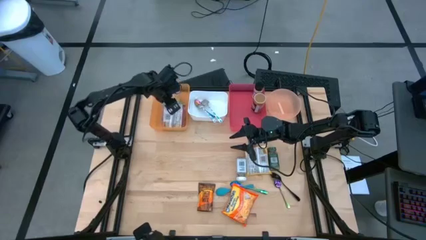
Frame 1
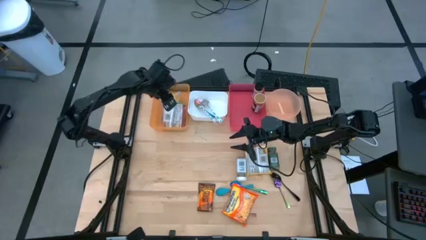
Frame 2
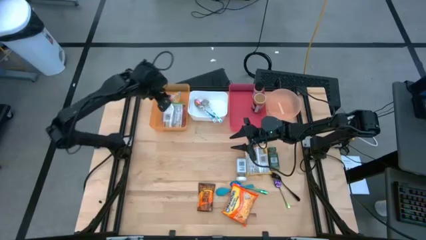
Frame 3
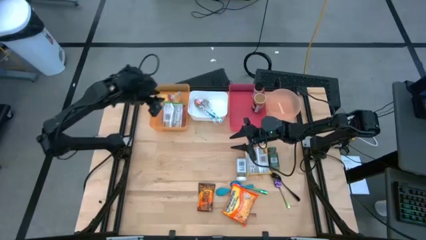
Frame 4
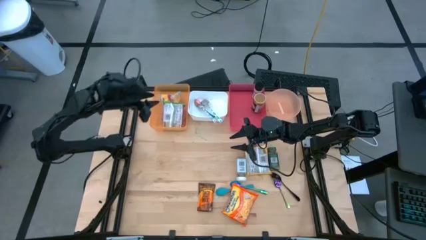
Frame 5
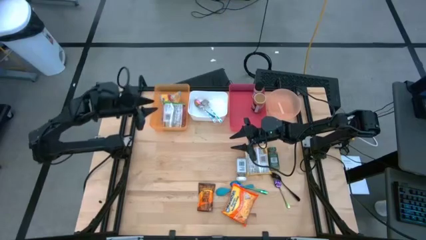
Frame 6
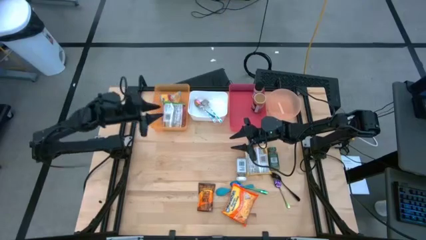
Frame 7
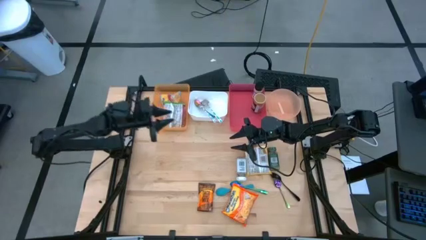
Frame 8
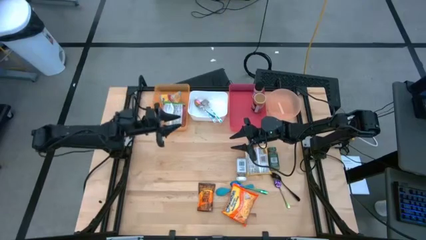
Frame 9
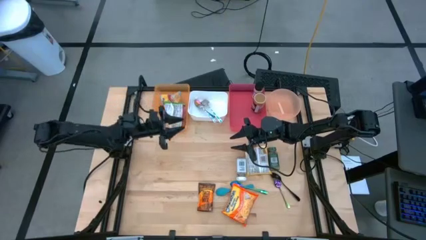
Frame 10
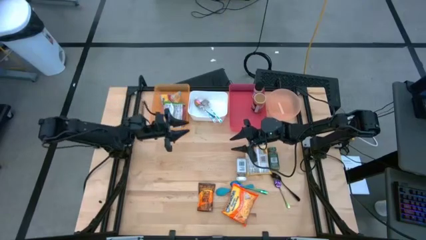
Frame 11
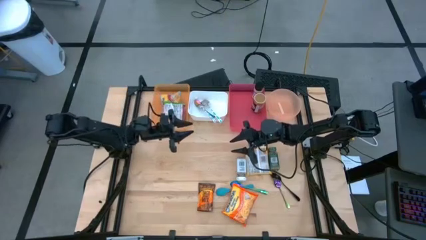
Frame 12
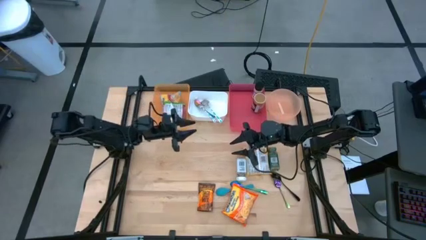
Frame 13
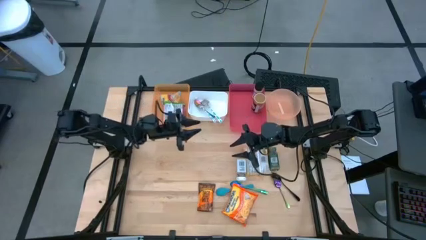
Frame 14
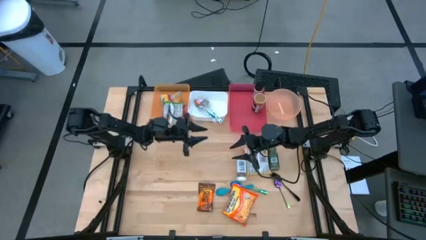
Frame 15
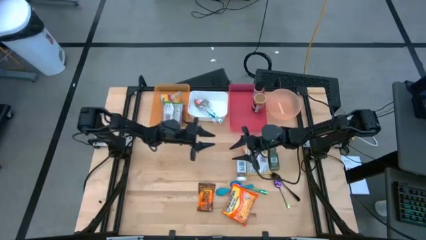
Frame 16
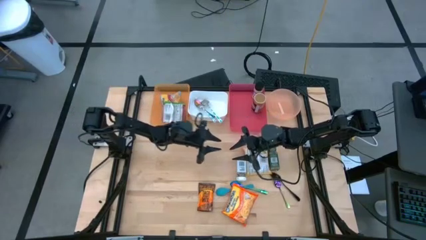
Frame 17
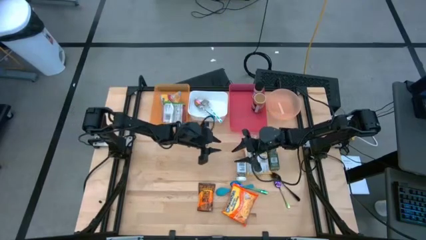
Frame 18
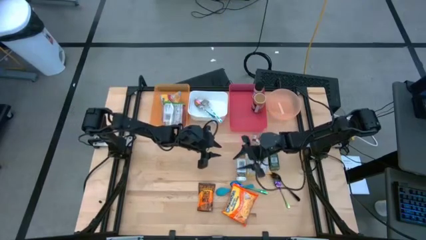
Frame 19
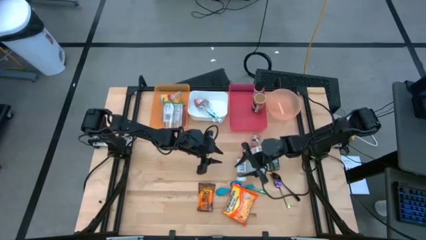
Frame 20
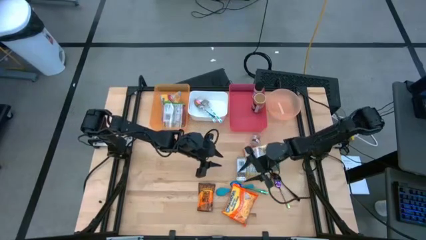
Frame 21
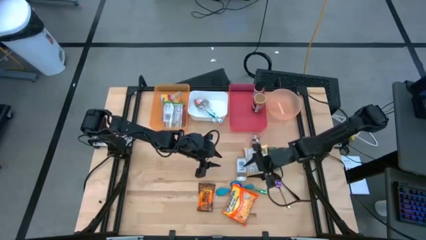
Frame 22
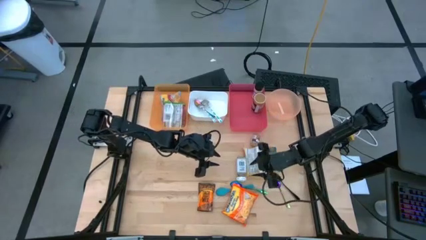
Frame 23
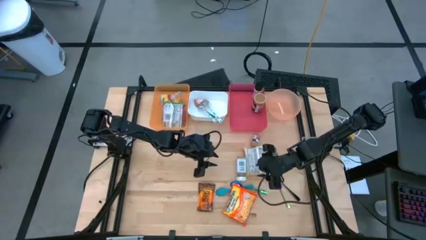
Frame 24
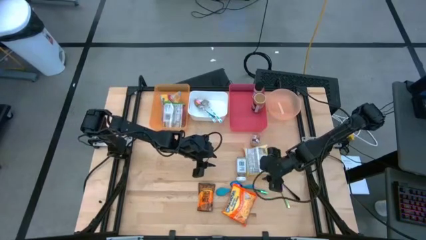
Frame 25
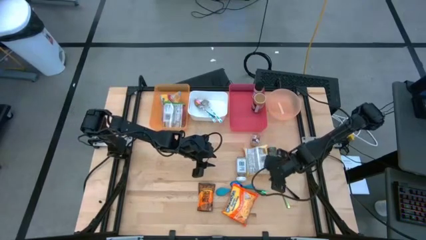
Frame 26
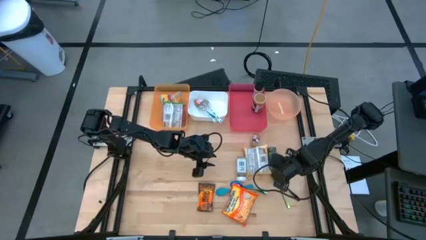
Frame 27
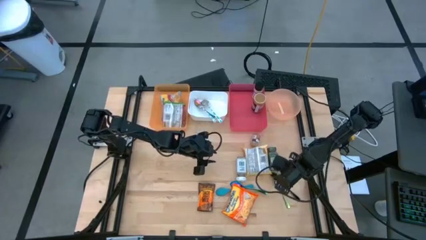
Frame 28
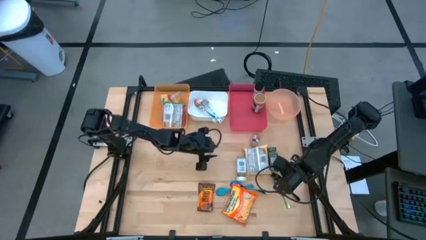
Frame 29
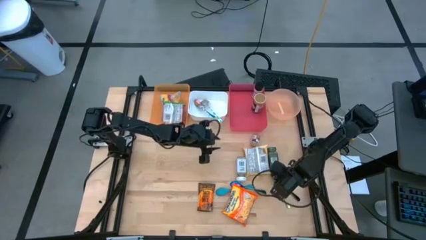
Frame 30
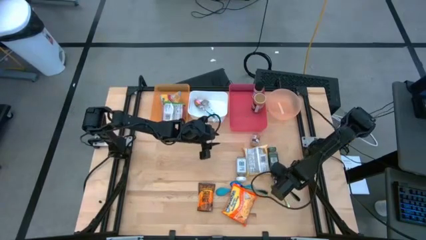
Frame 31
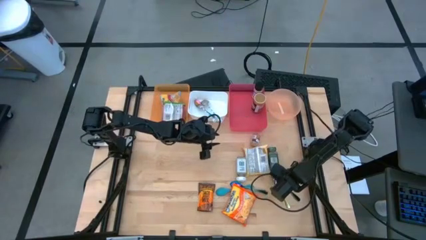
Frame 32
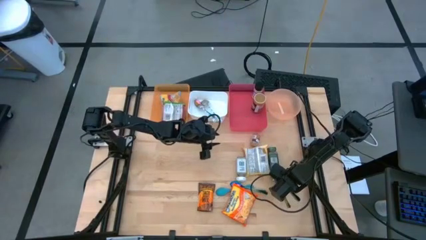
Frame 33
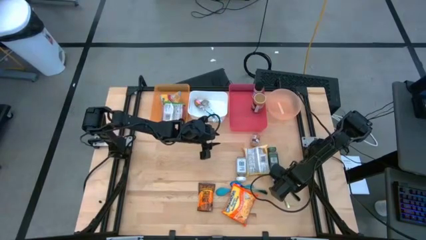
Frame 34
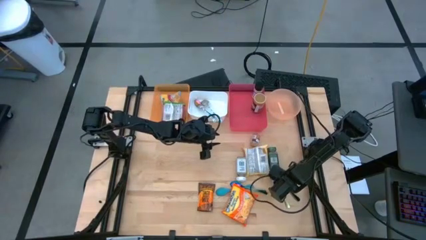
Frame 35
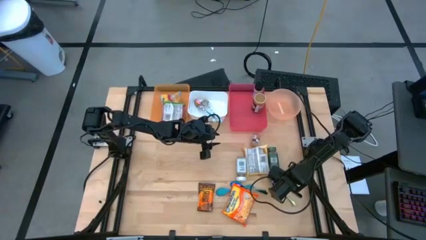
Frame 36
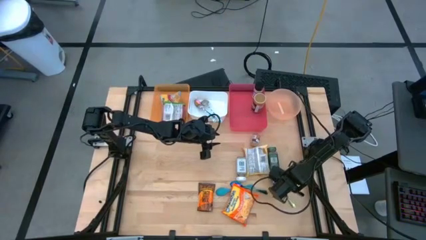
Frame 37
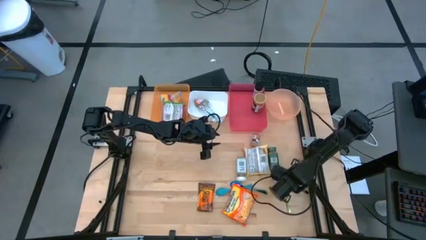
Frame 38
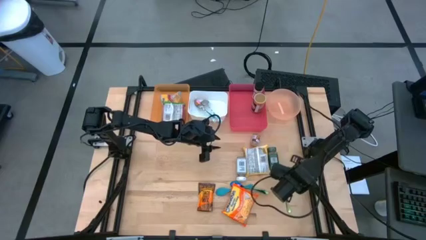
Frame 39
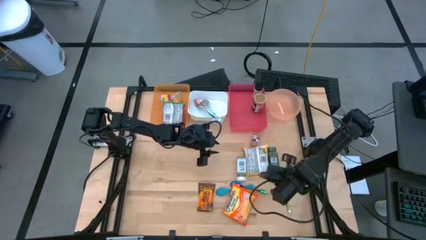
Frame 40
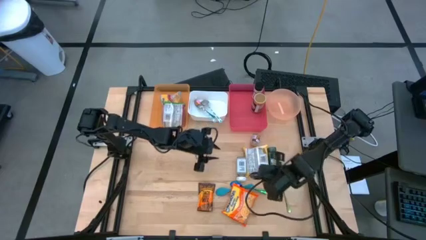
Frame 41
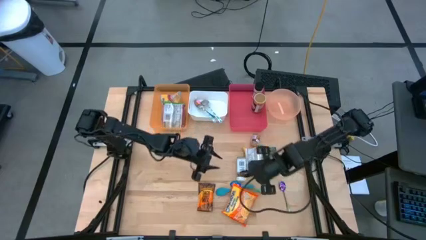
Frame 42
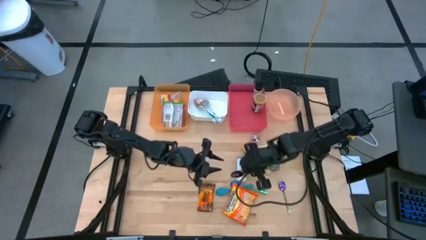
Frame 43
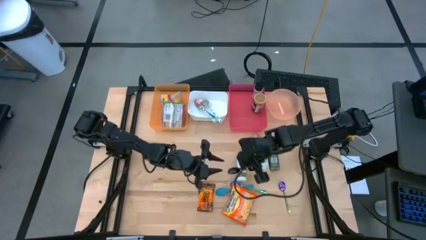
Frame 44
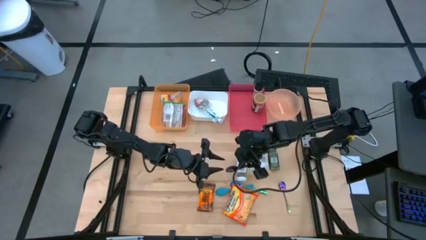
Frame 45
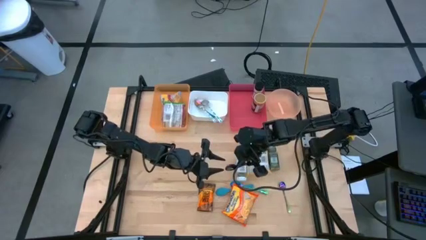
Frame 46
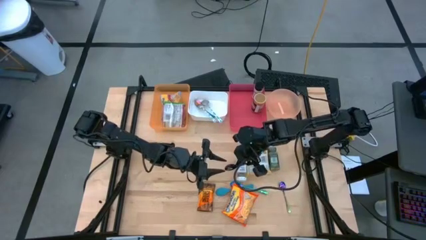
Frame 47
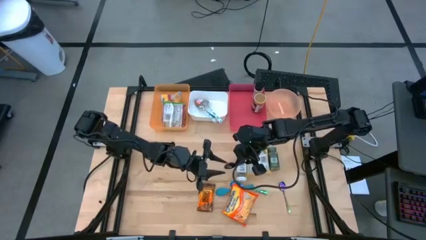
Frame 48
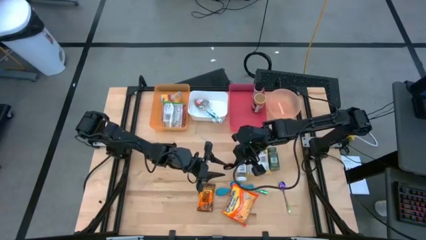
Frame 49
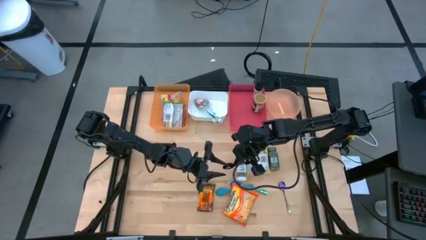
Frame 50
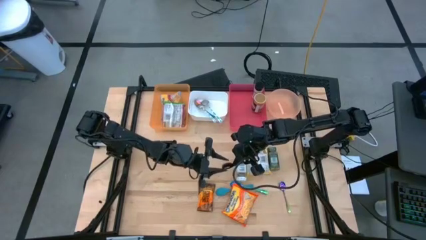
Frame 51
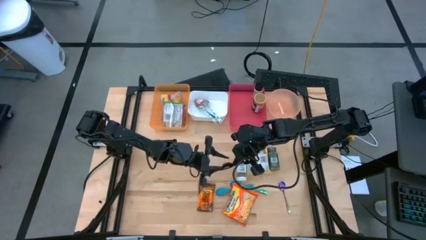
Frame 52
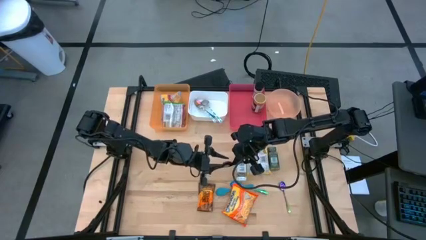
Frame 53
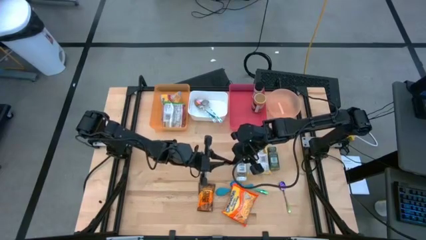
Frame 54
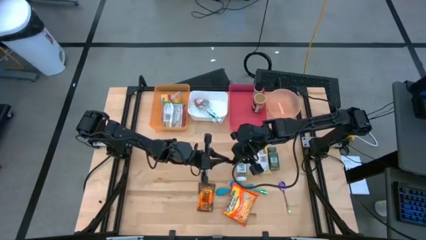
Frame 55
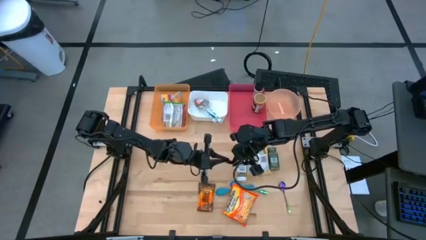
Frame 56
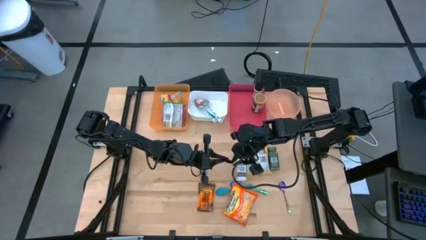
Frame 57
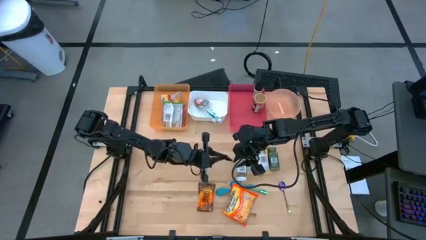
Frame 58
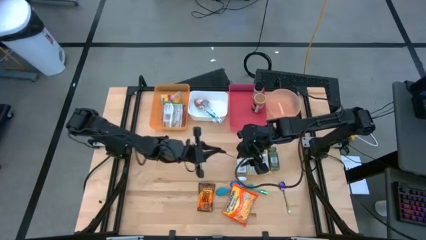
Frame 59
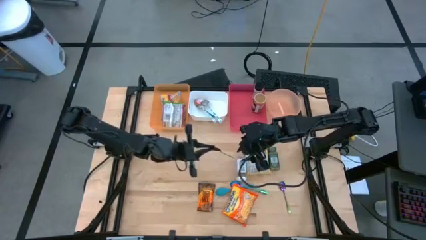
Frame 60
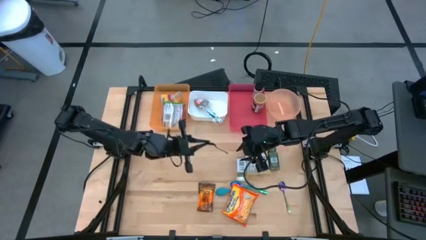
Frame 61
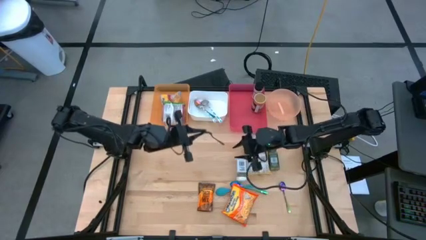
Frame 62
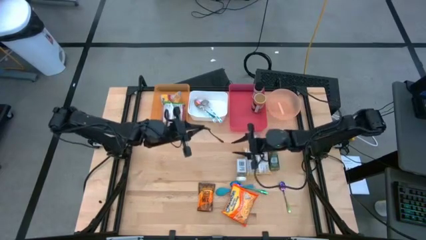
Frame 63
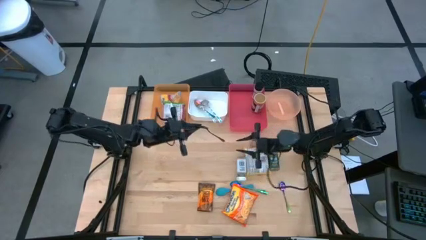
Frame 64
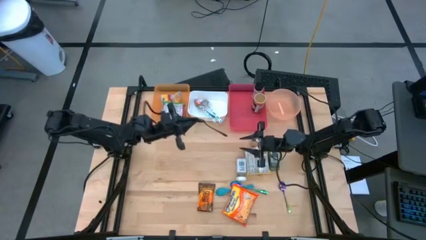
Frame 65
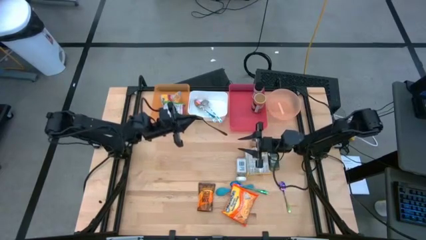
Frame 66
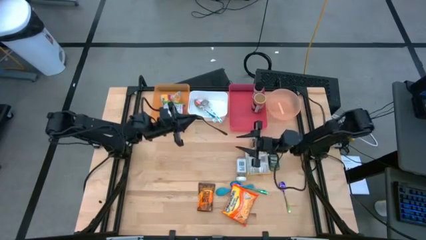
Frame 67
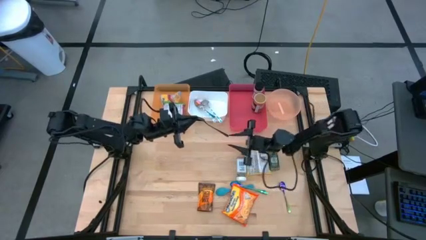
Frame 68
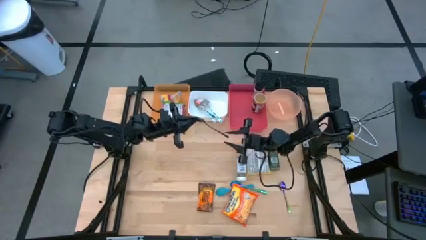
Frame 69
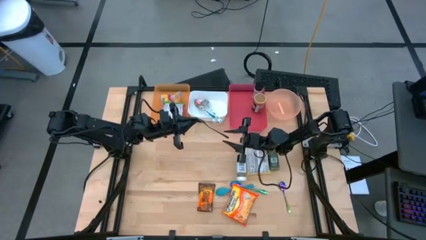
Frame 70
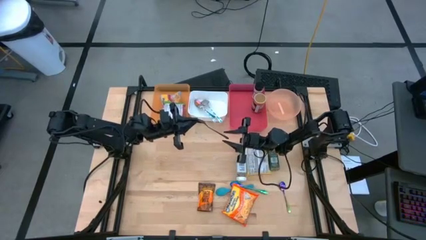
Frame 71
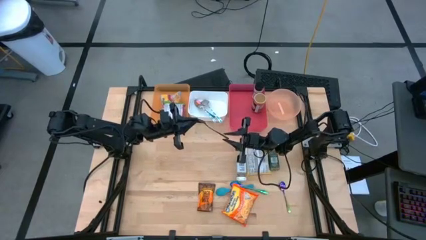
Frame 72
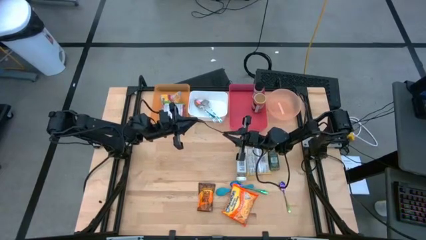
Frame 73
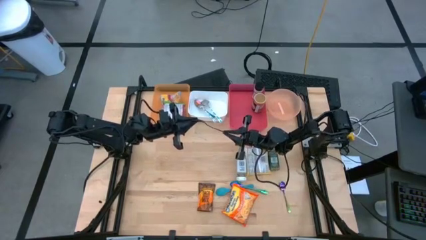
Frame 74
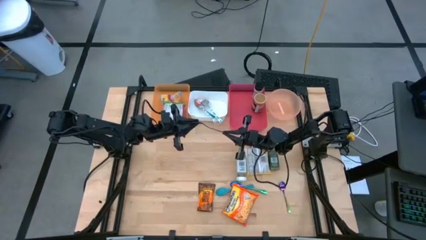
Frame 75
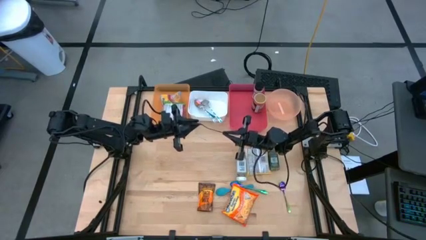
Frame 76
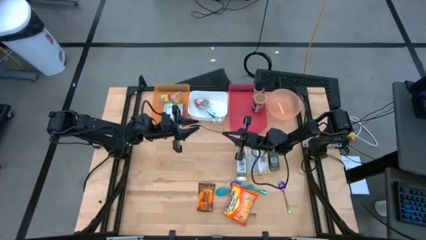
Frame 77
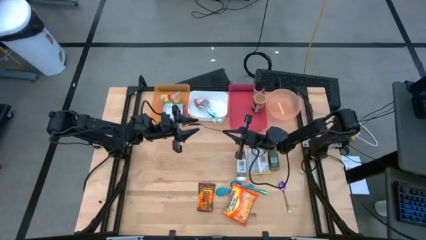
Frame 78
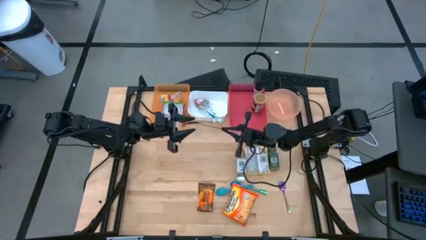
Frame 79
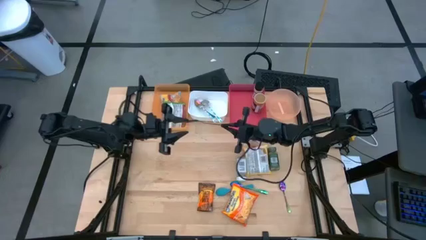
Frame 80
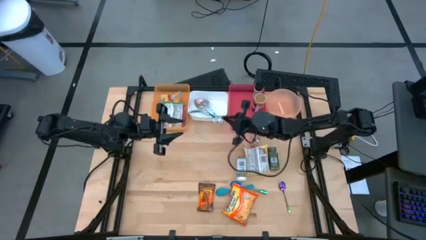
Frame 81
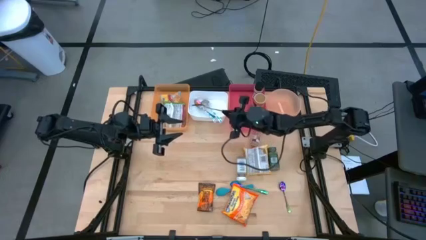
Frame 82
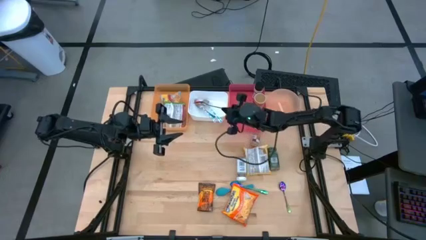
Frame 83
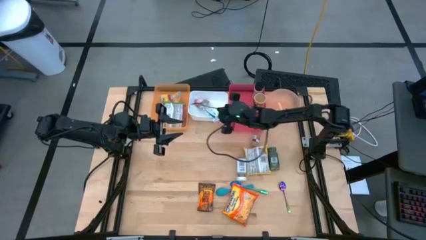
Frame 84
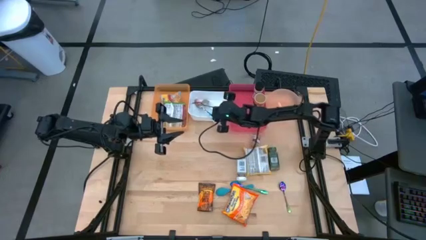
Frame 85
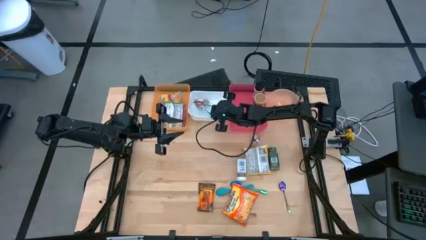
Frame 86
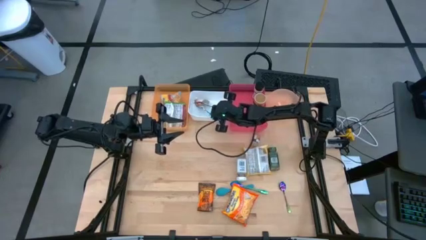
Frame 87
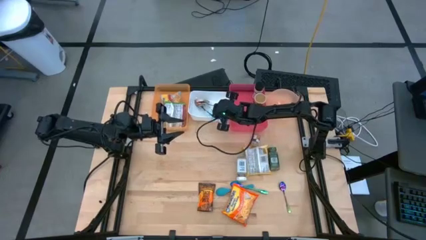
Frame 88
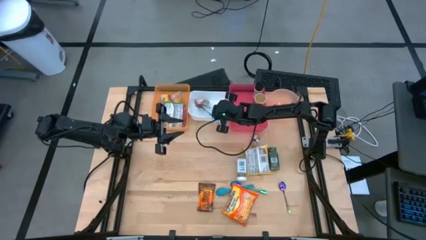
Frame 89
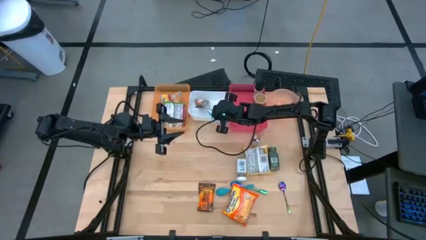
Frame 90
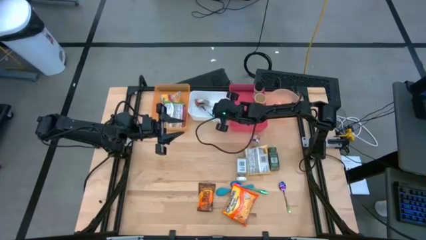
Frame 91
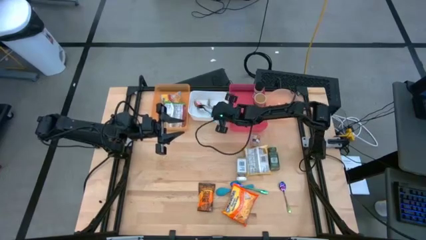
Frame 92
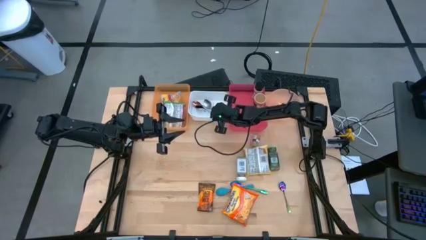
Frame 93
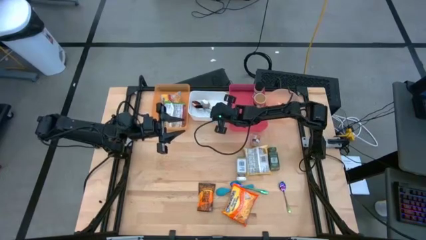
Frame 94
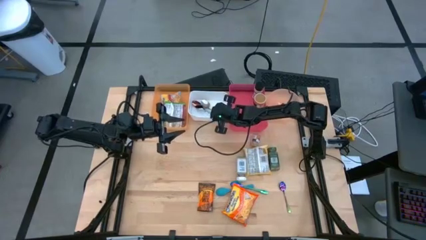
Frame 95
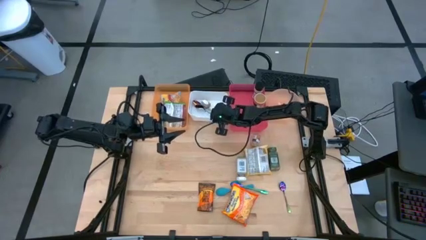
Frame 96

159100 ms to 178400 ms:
Task: Pick & Place Food Item
Put the black spoon into the white bin
